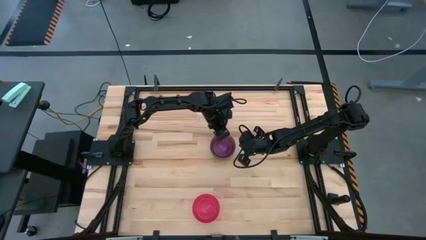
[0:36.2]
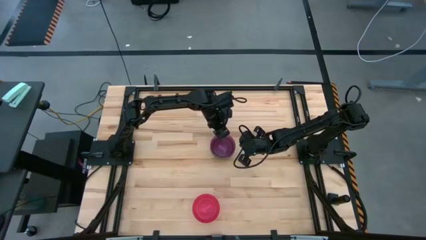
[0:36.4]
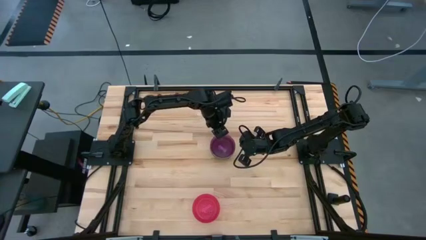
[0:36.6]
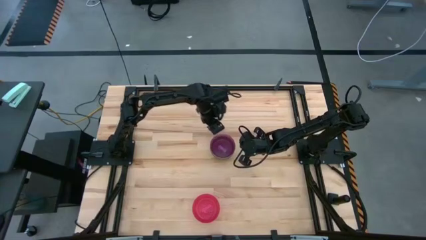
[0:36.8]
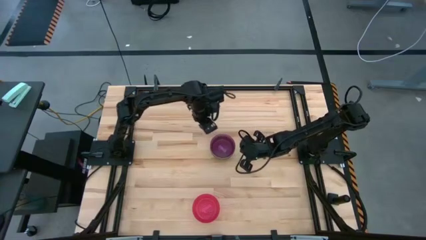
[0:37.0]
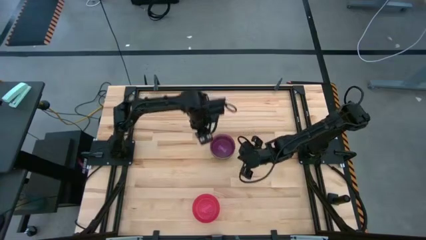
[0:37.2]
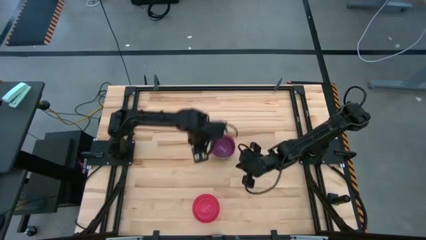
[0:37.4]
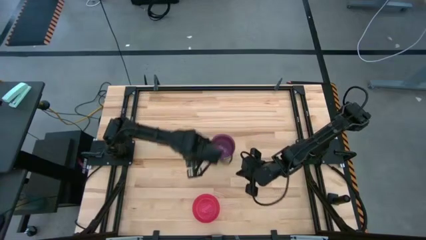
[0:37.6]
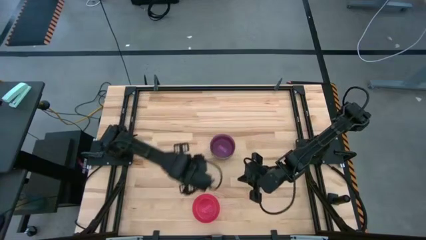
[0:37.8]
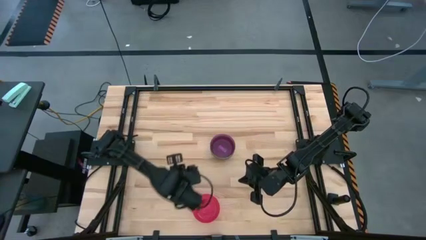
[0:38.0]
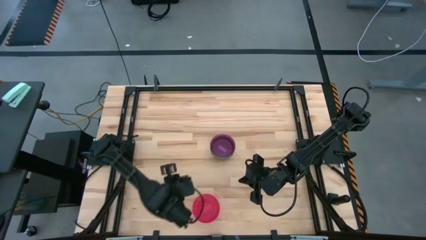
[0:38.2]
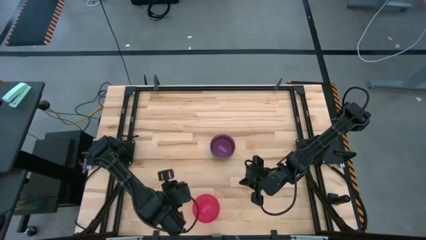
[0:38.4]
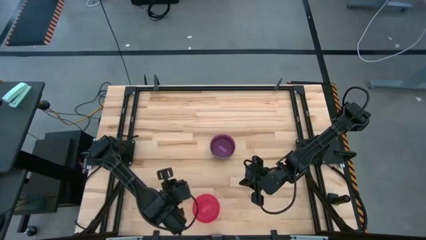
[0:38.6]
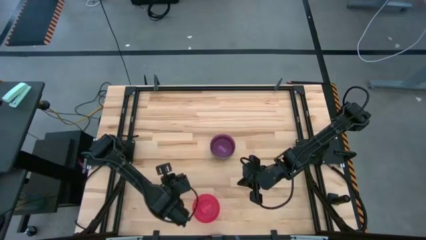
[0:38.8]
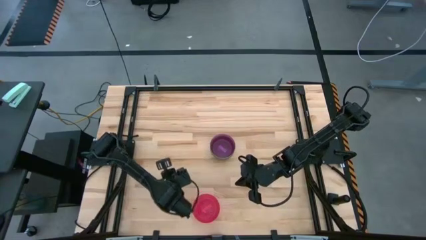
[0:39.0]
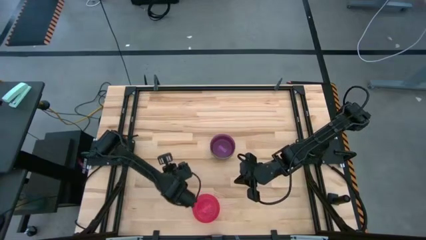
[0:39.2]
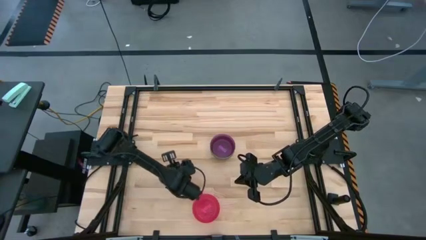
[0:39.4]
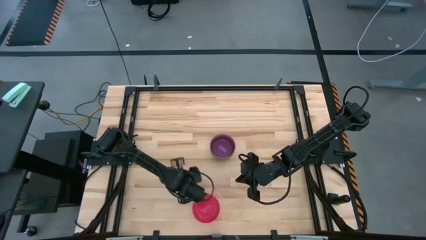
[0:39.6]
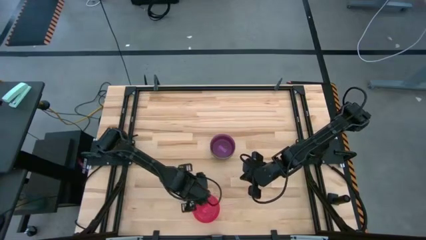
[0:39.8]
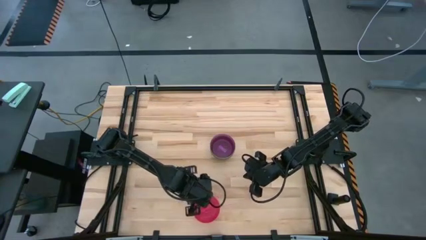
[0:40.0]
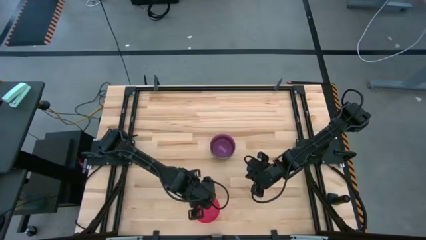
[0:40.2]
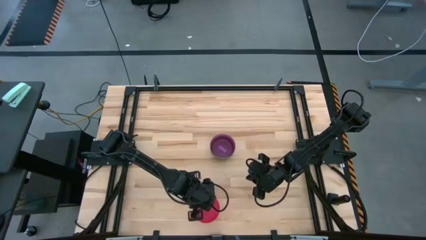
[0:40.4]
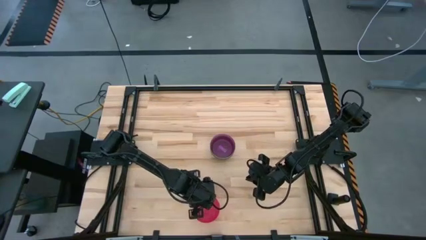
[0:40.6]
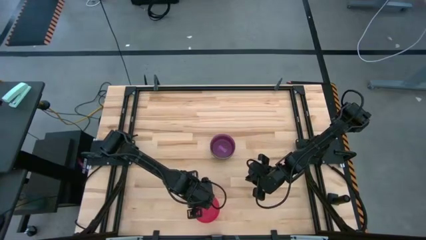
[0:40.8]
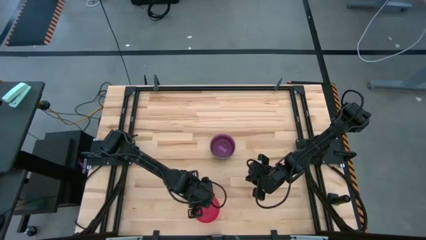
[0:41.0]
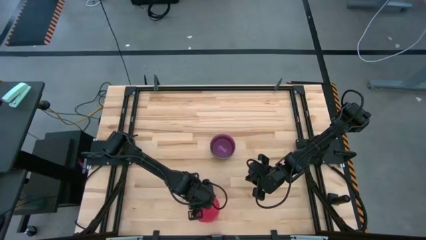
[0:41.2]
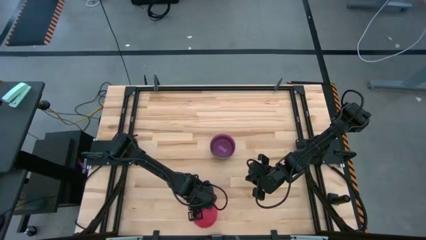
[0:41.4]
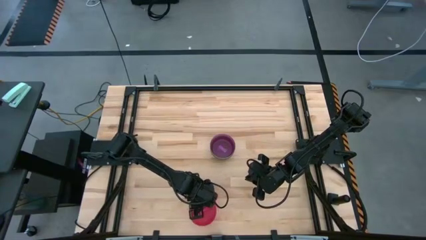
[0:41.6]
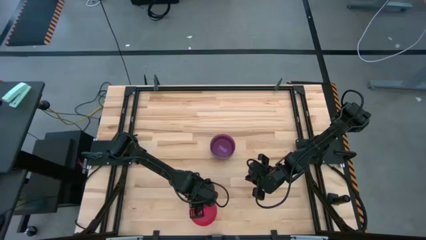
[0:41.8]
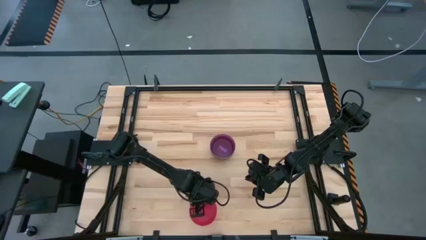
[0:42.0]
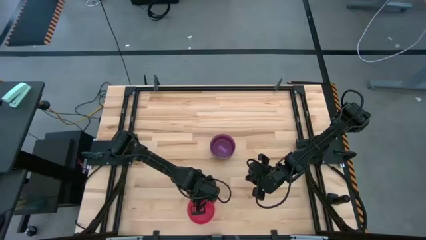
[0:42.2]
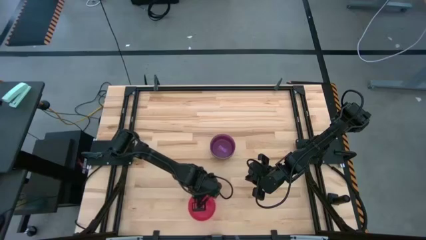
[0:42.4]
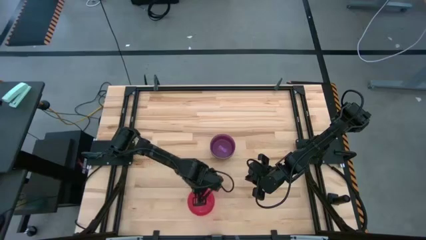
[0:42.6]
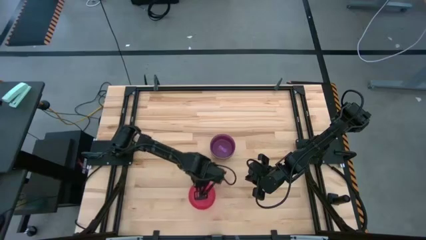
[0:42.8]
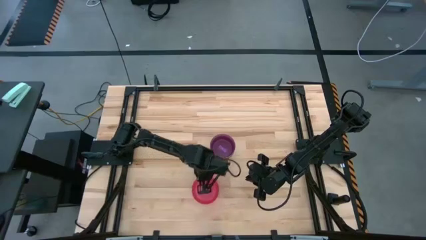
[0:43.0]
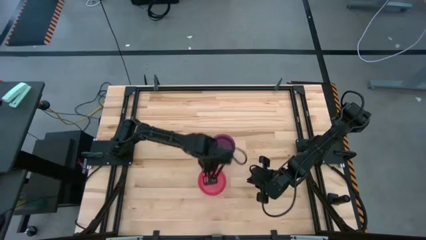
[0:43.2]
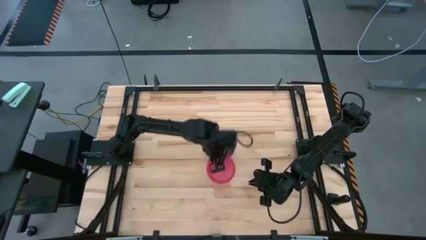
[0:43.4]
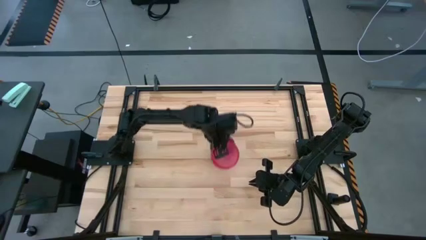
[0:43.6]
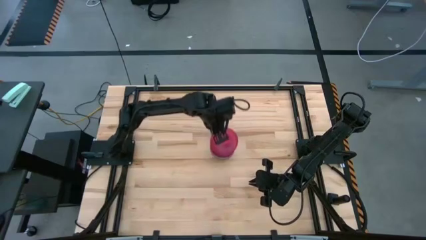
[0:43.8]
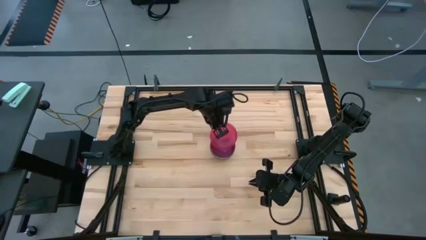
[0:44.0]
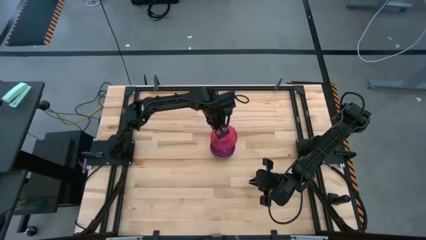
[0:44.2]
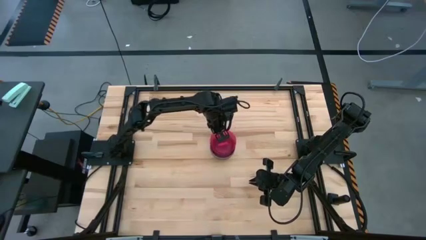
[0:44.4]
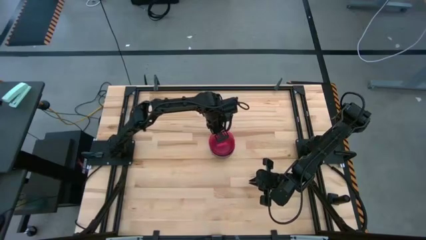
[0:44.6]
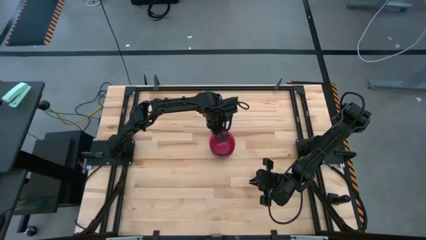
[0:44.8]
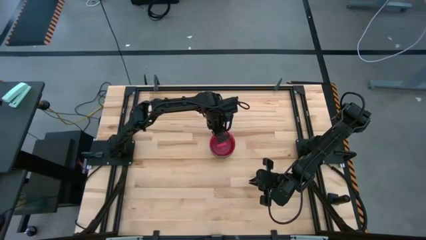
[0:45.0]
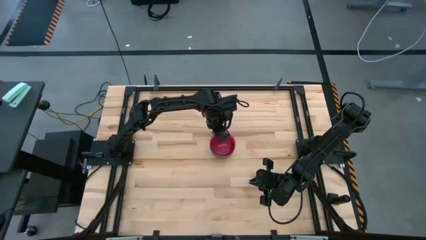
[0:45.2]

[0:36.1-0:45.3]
Task: Nest bowls inside each other
Stack the red bowl on top of the violet bowl

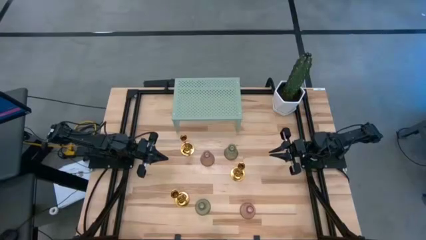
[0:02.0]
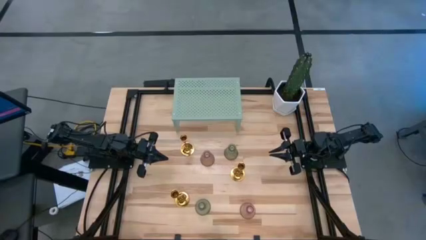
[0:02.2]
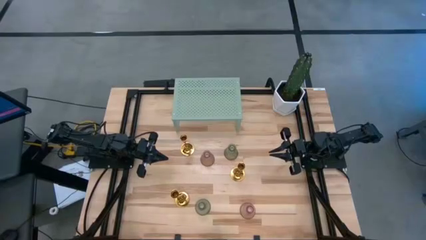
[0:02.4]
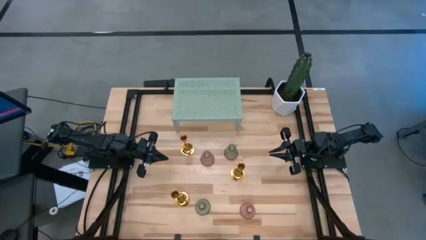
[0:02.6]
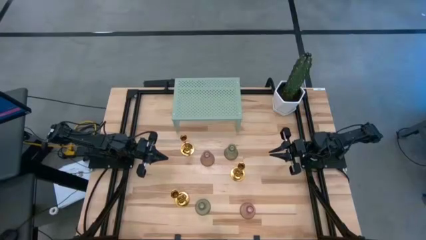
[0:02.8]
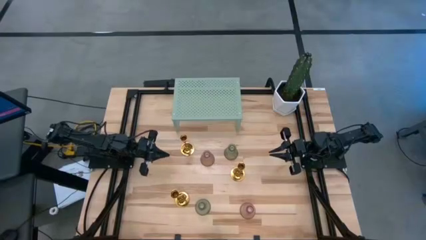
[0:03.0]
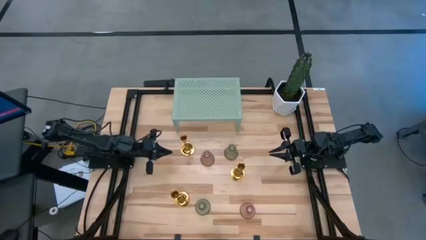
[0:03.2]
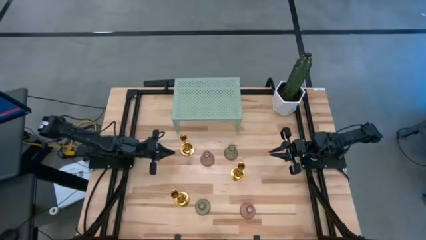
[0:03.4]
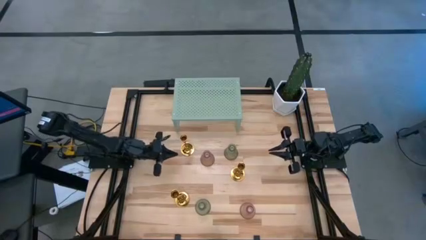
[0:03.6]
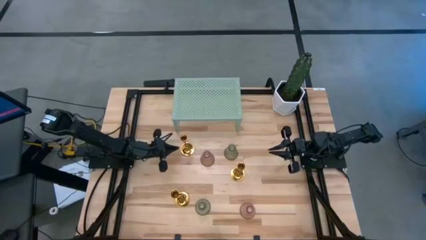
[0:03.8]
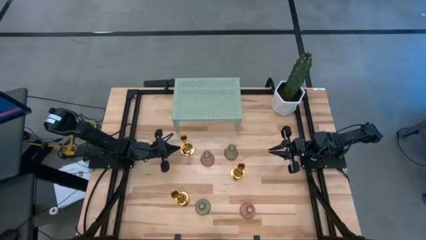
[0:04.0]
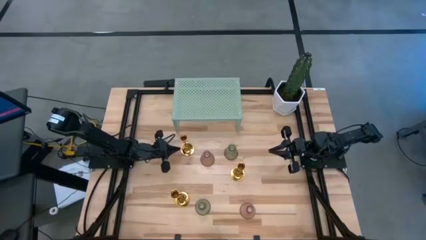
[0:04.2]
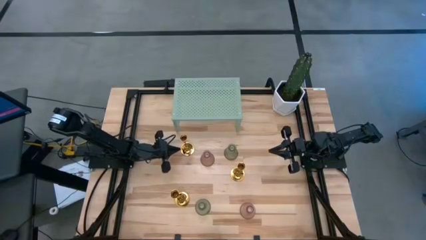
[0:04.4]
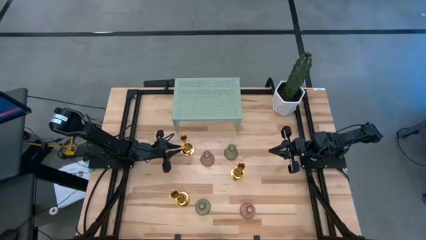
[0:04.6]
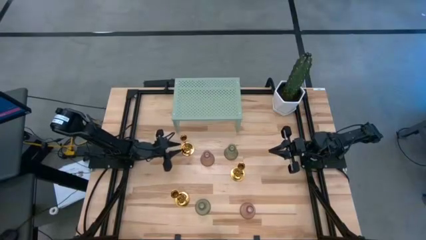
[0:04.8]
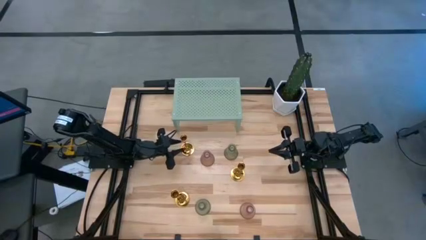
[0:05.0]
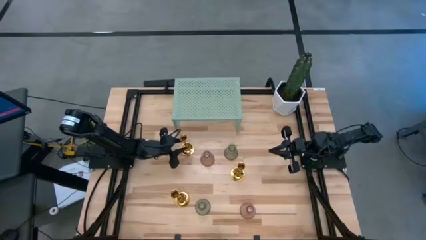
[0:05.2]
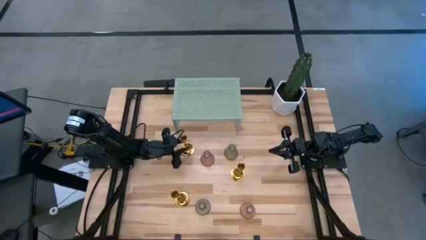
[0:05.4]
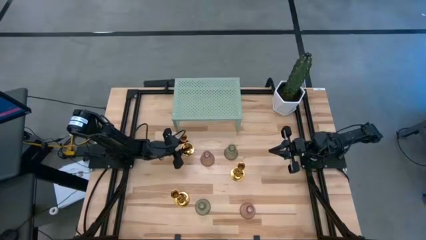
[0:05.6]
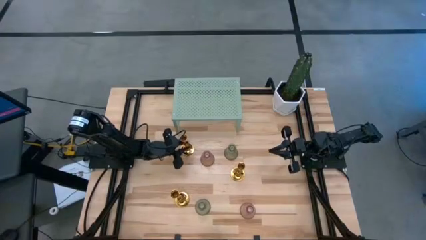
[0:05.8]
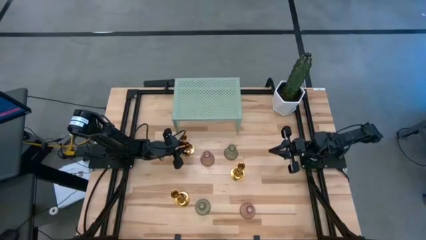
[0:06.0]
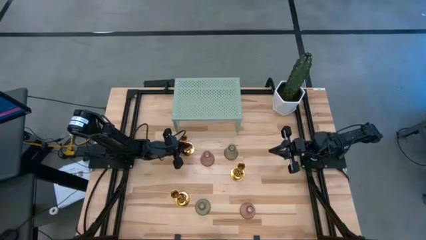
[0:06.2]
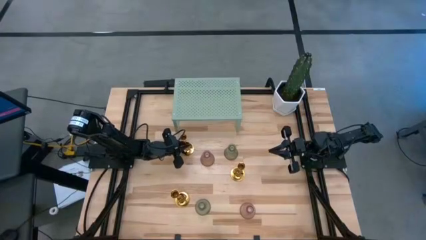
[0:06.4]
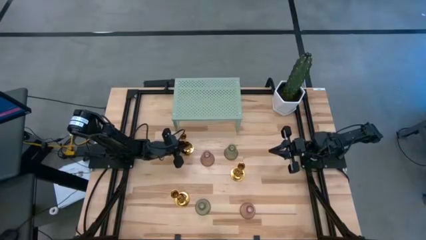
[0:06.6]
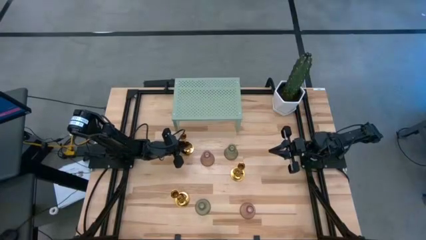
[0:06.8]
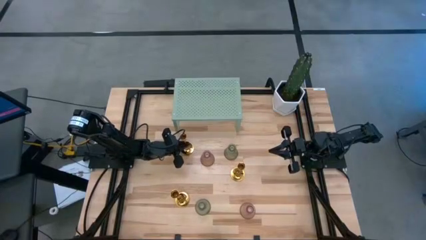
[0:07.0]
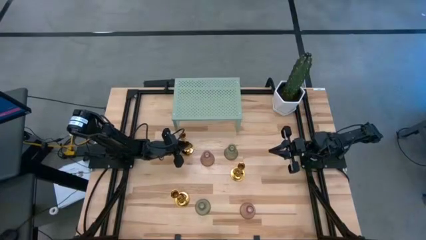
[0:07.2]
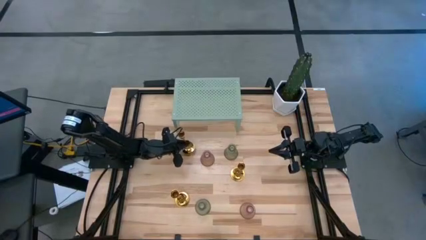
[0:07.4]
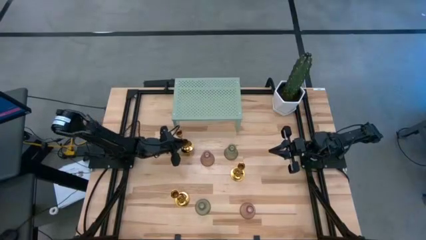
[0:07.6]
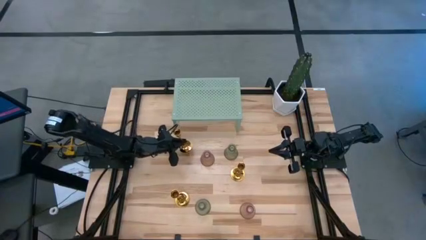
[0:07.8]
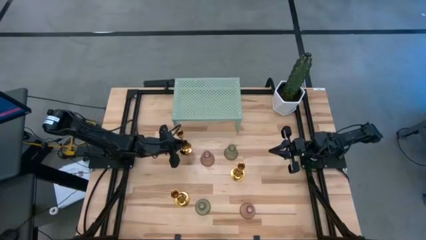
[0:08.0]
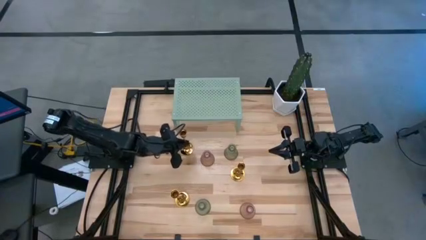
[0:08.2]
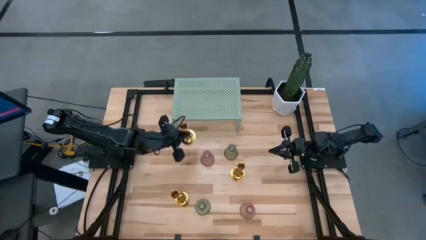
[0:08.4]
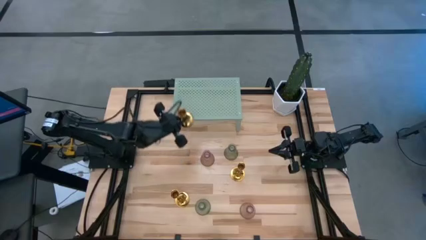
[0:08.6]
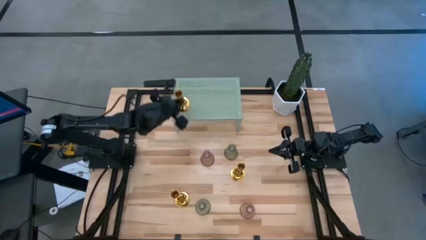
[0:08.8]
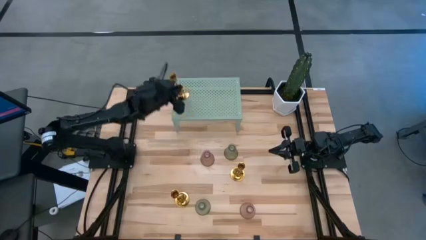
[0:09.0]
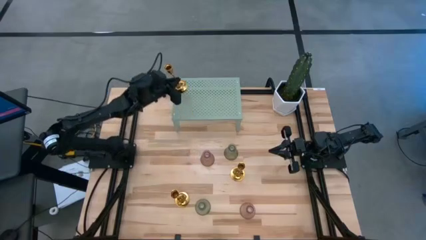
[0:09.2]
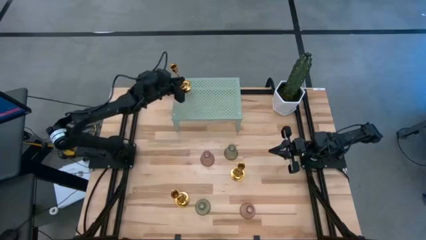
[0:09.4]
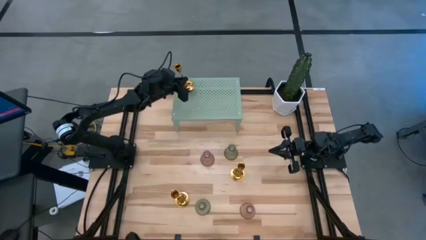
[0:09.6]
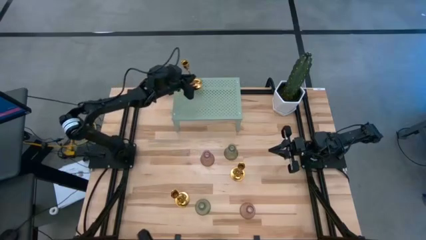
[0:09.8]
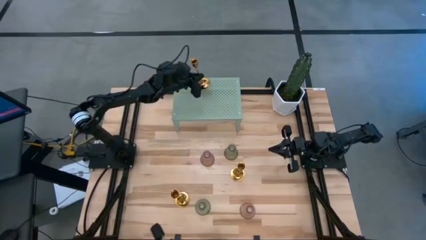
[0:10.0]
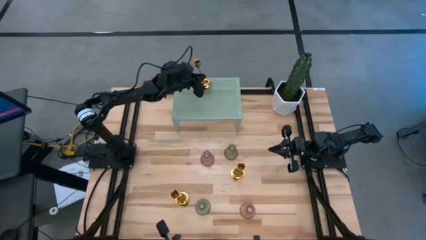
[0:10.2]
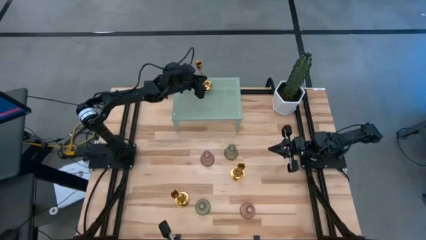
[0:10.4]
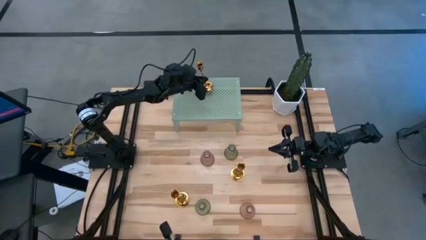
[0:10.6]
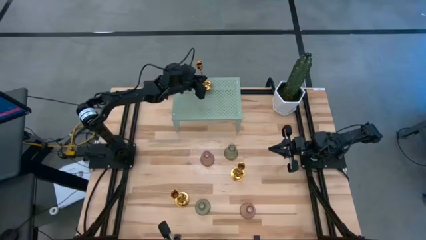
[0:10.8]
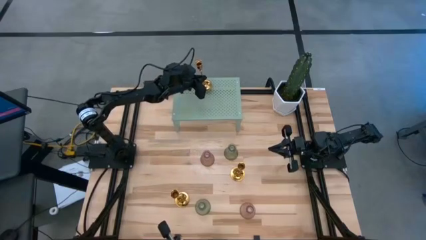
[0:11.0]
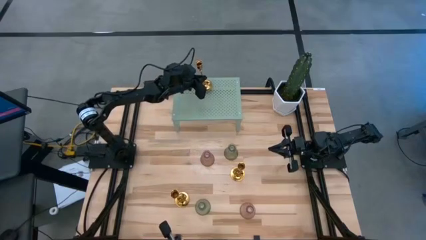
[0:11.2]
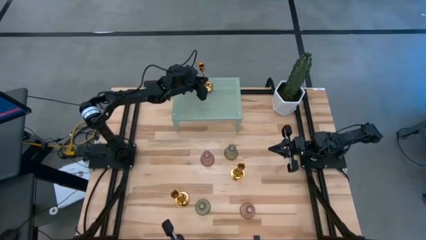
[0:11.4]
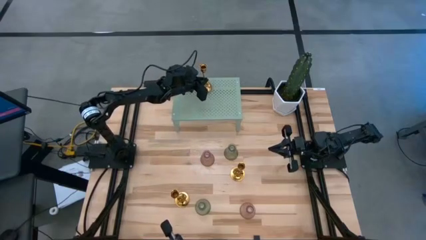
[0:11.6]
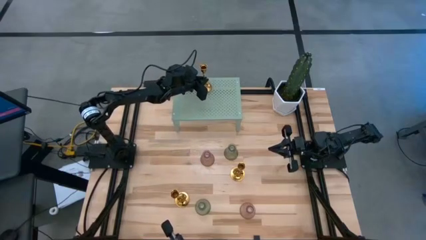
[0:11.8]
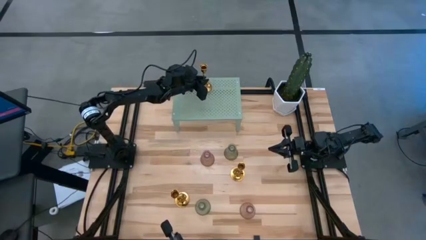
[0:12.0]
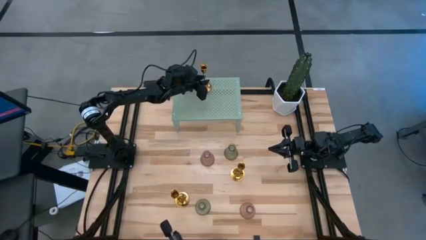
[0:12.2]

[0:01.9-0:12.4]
Task: Pick & Place candle stick holders
Put the top left gold candle holder on the shelf
